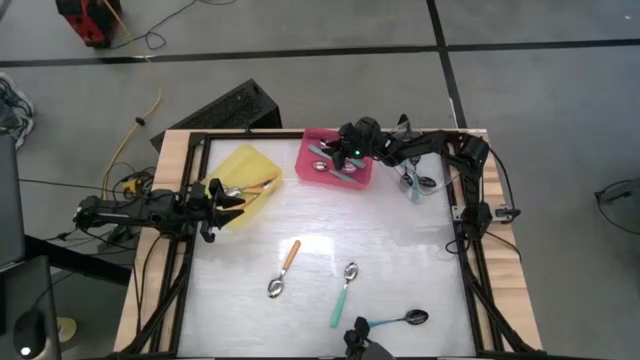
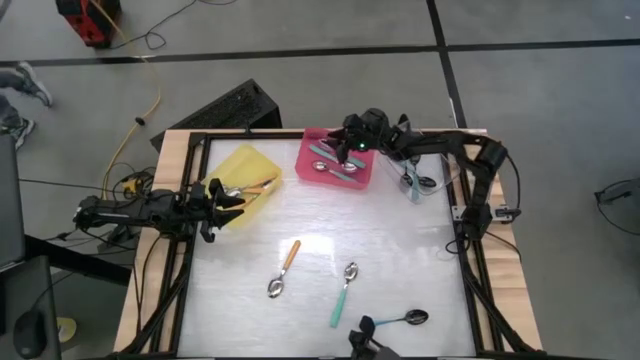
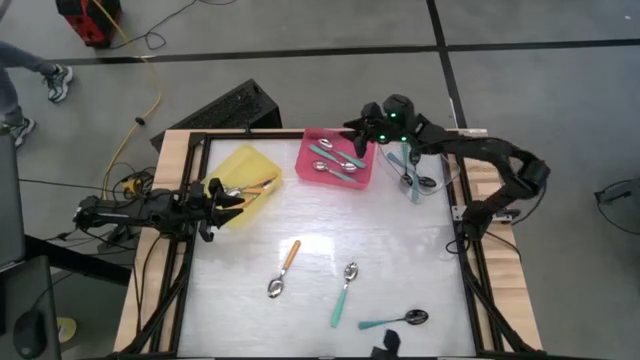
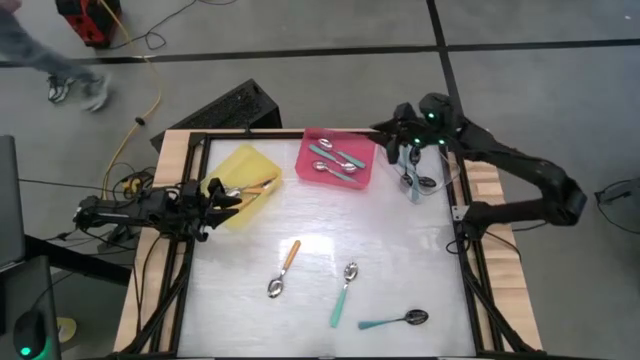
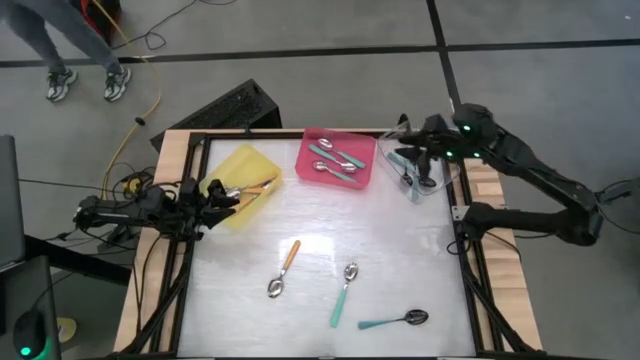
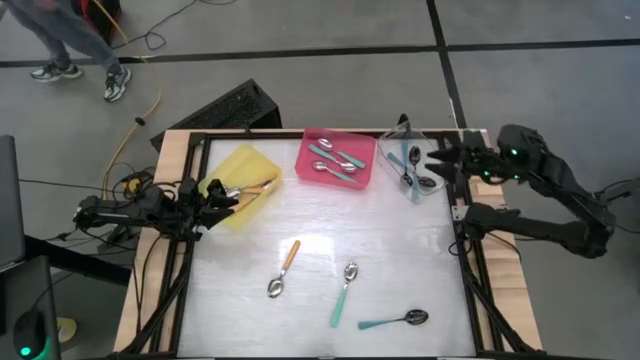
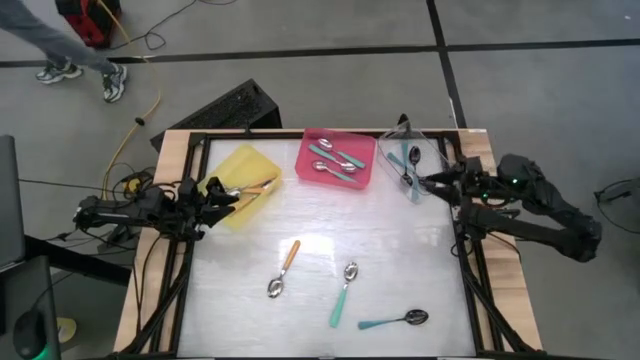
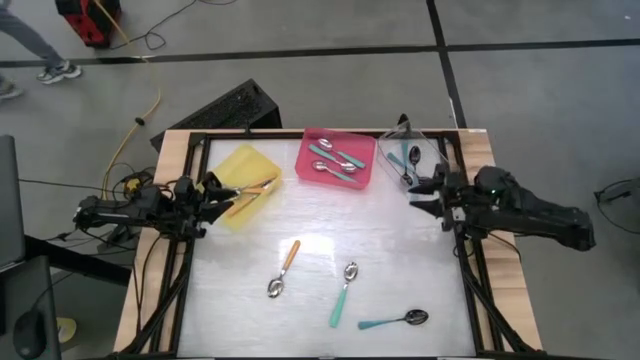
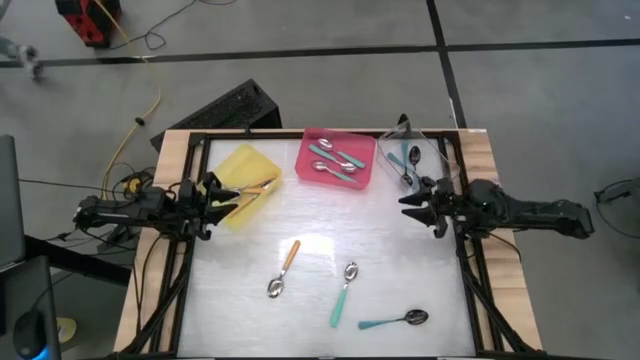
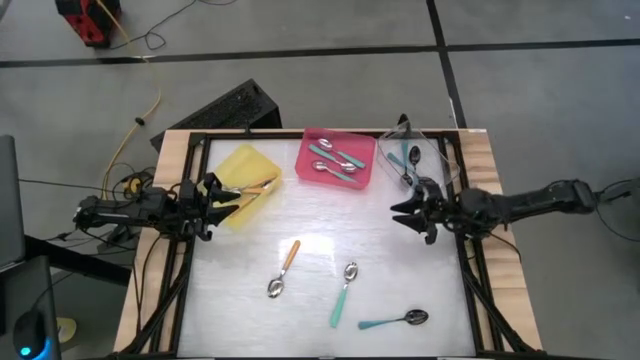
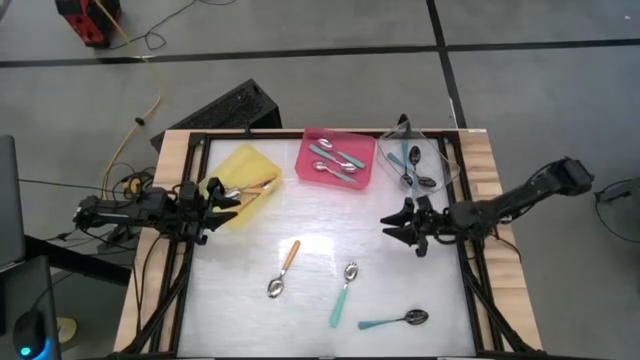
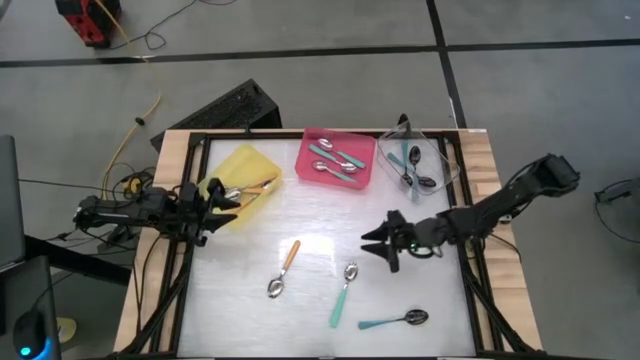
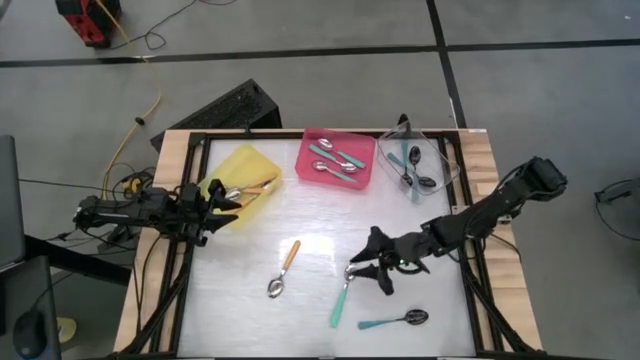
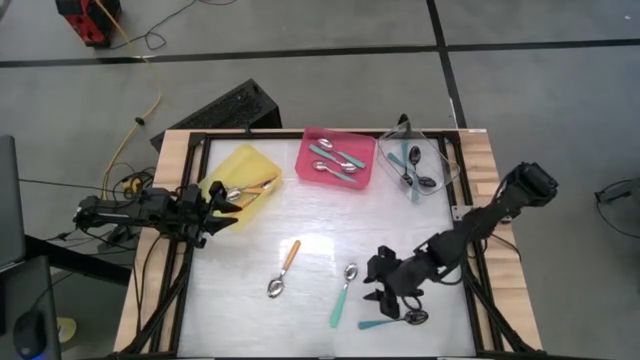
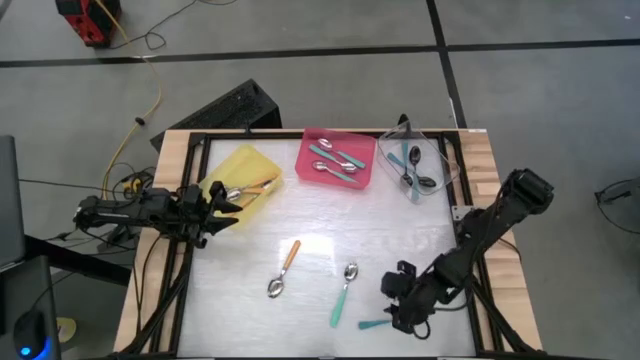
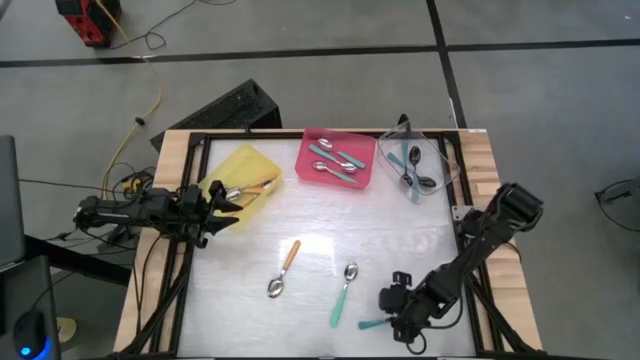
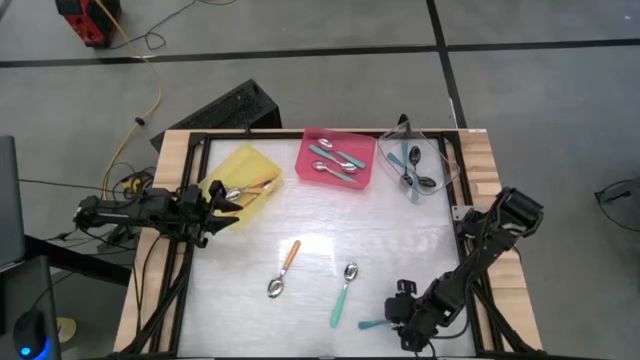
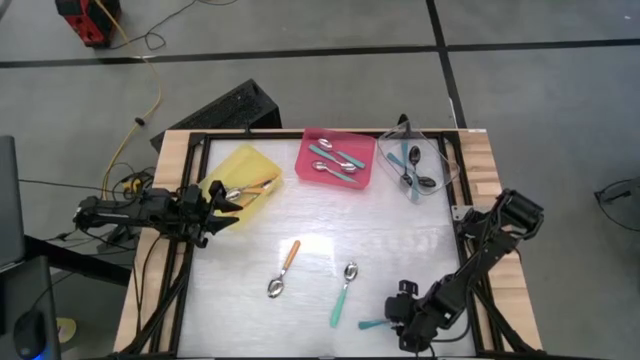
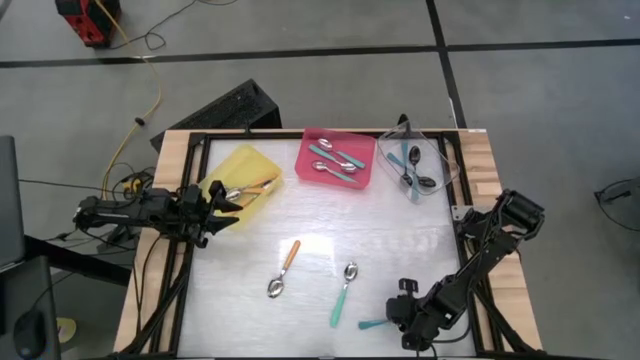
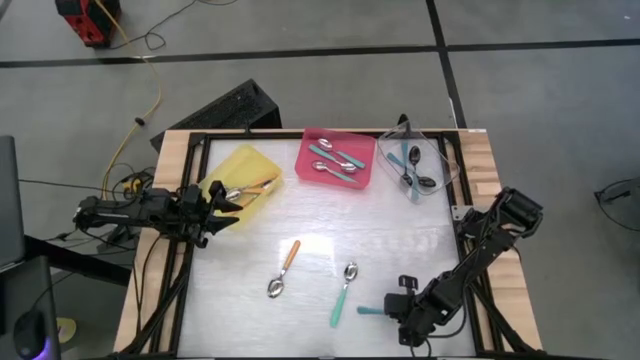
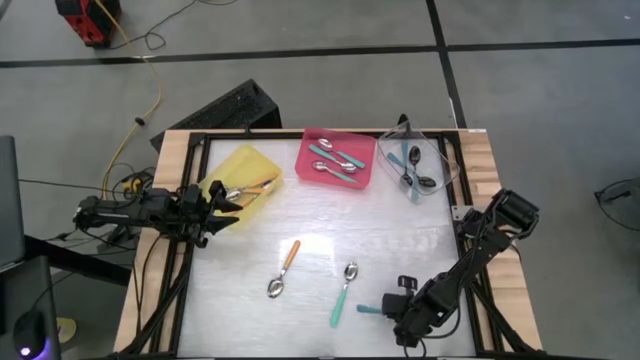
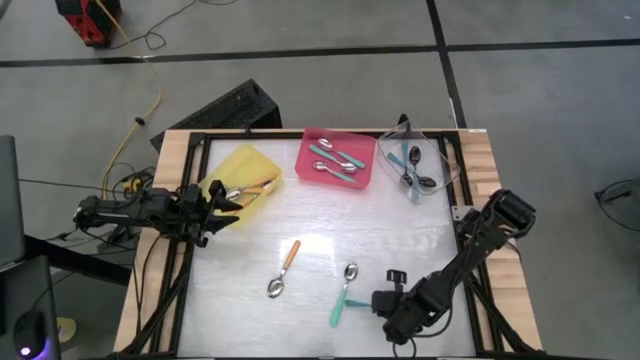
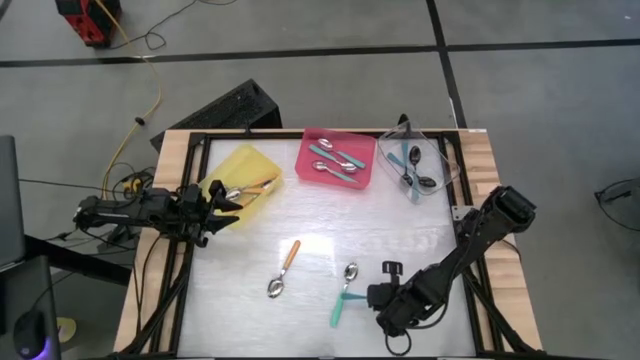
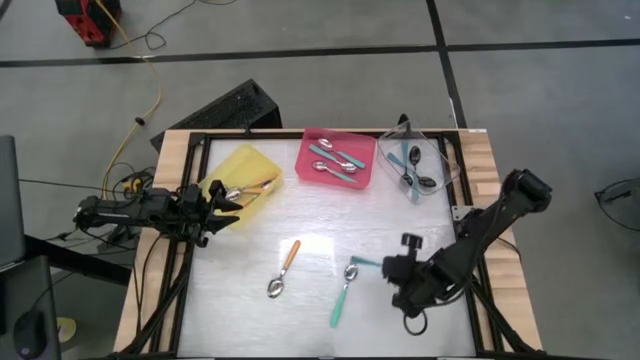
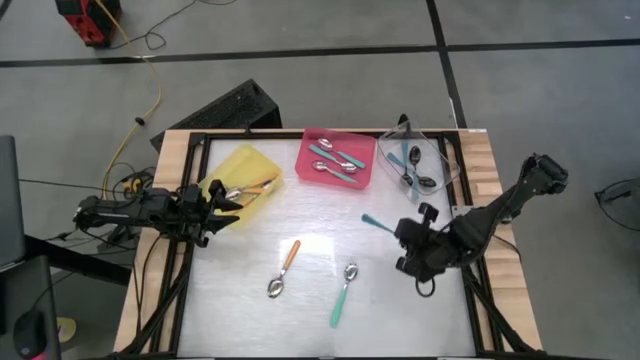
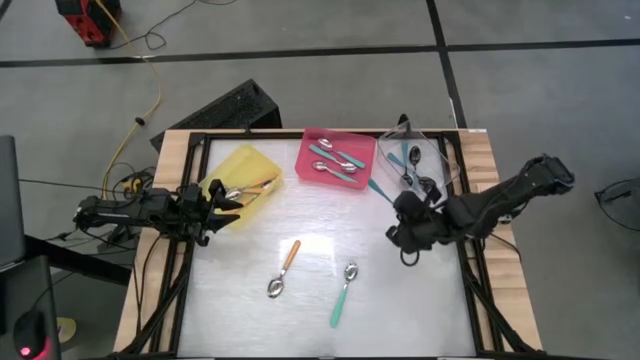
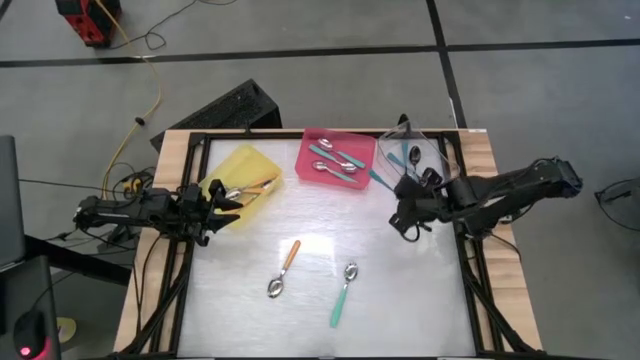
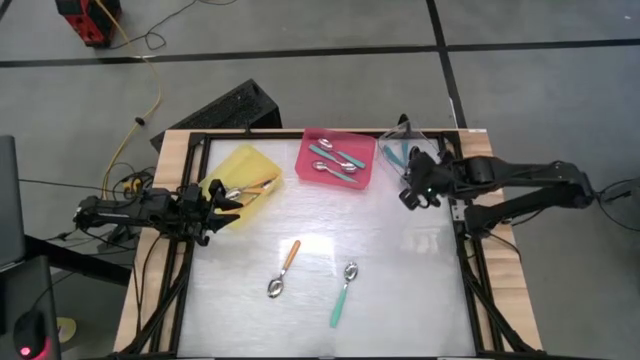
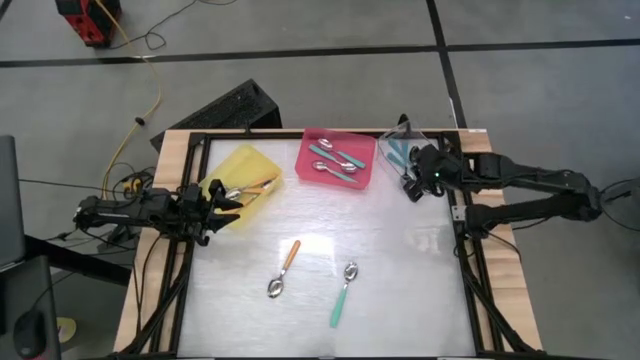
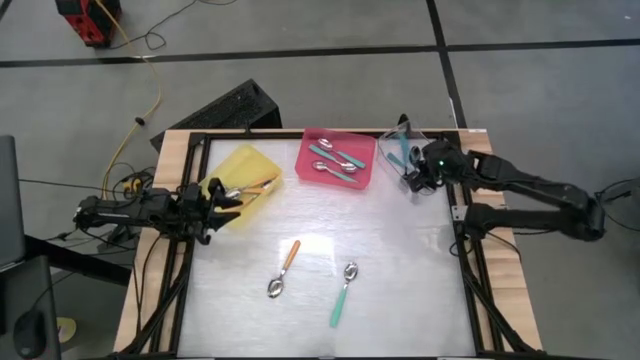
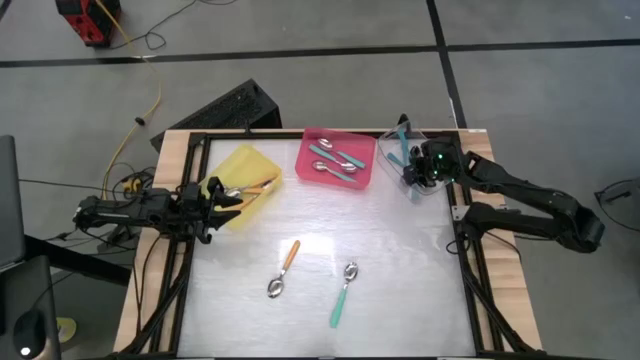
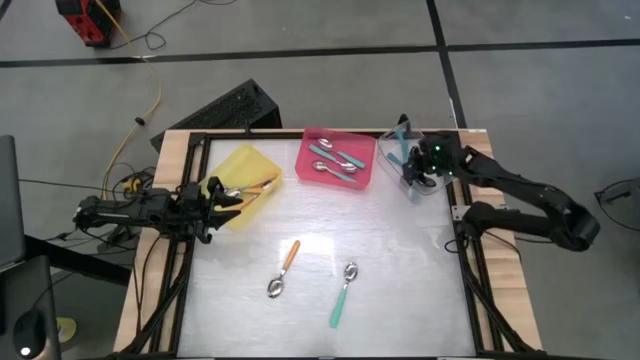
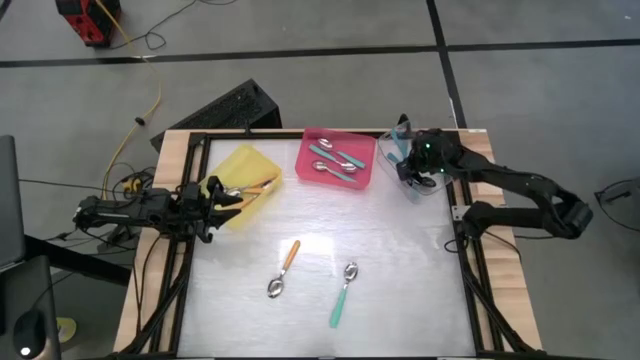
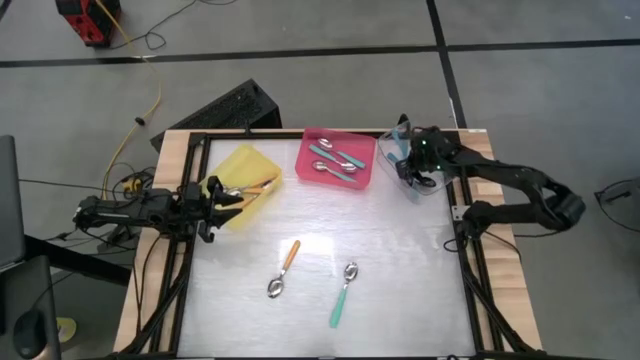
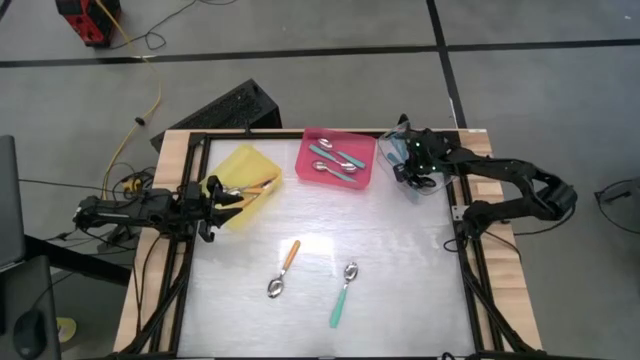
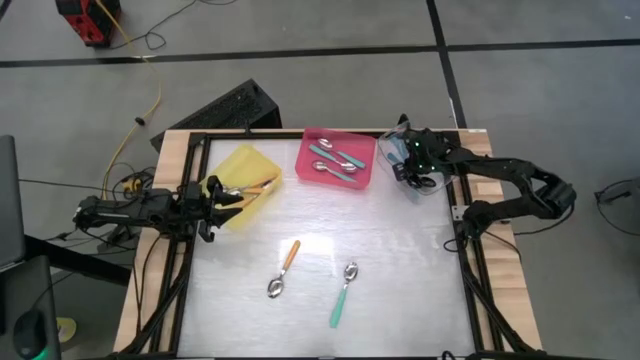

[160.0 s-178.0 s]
Task: Sort silverware by color (type)
Put the blue spoon into the transparent bin

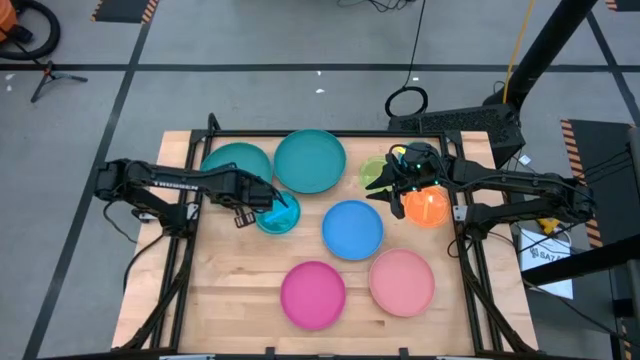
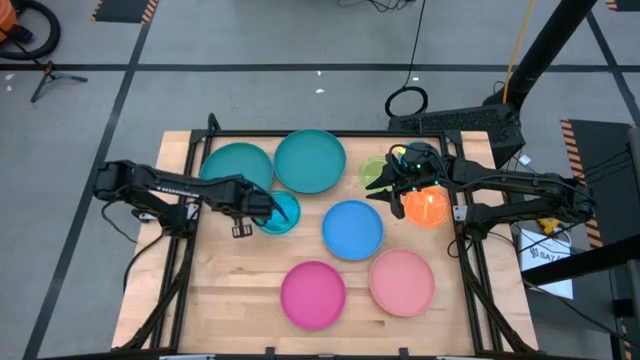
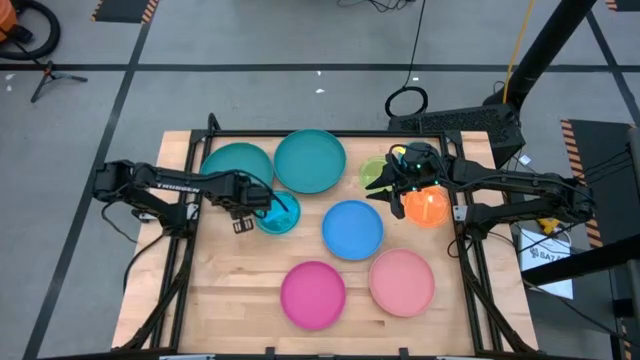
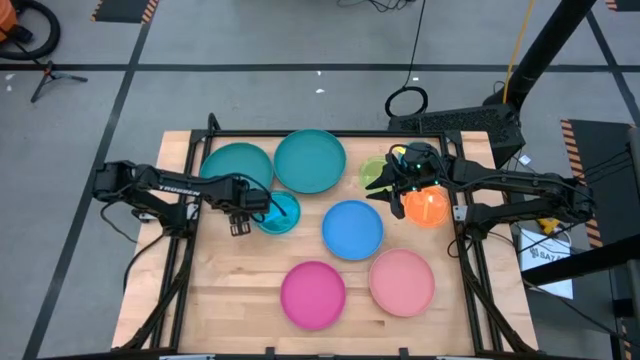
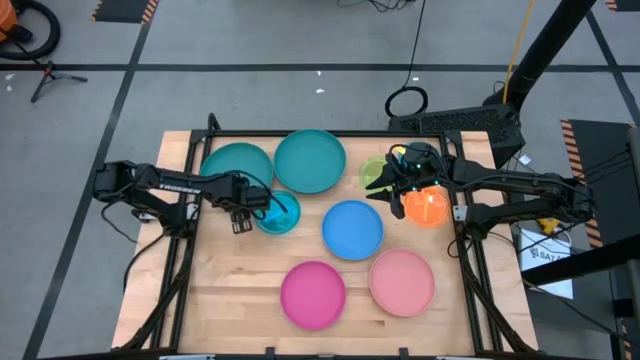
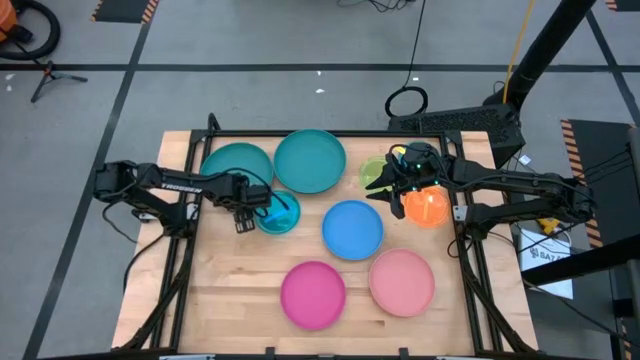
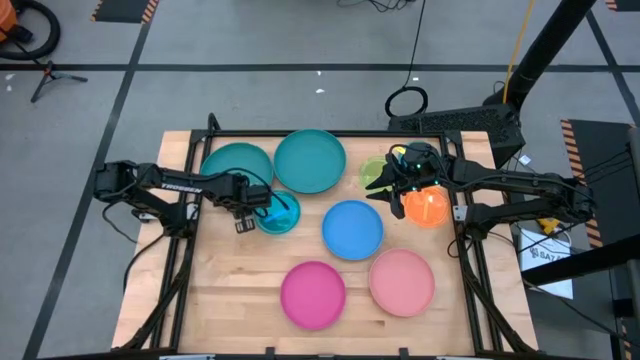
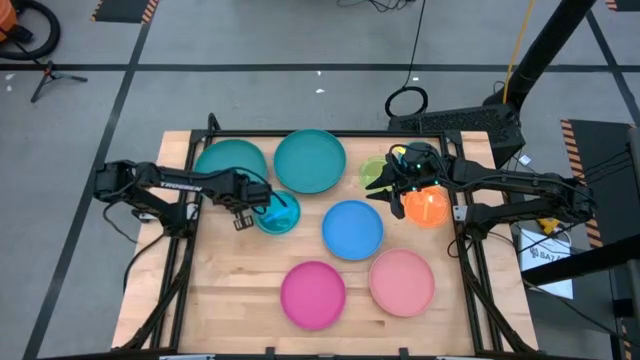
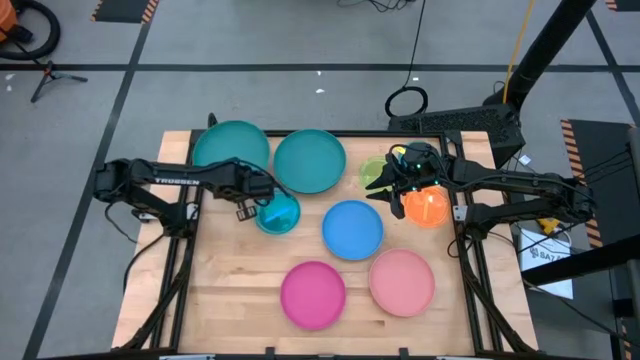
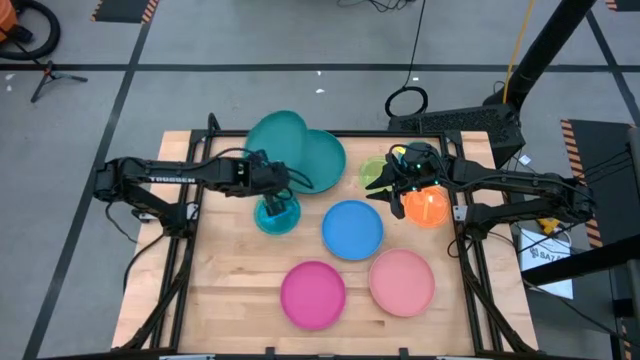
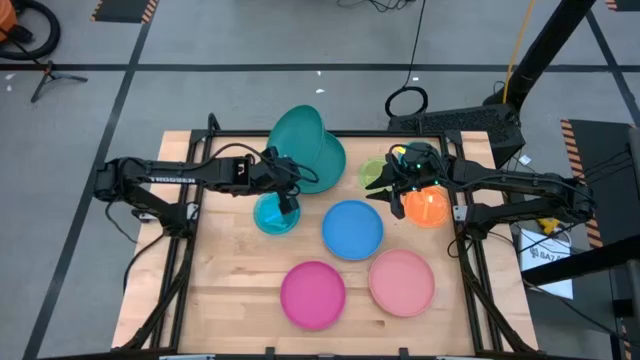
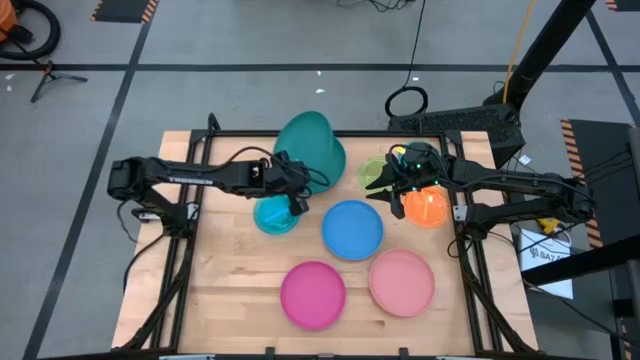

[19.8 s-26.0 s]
Task: Stack plastic plates
Stack the green plate on top of the green plate
